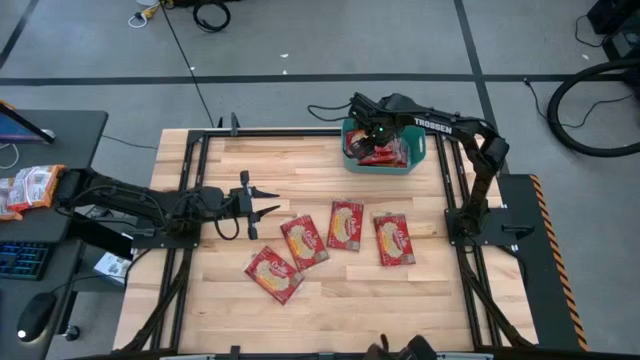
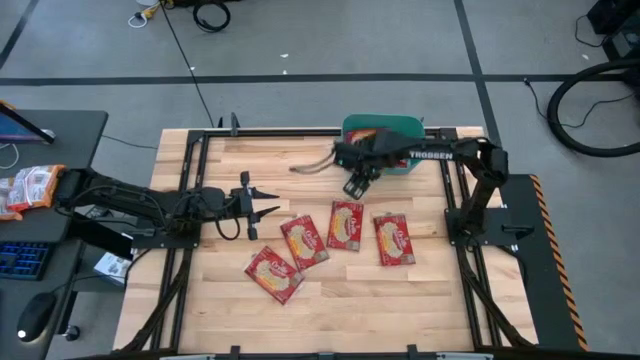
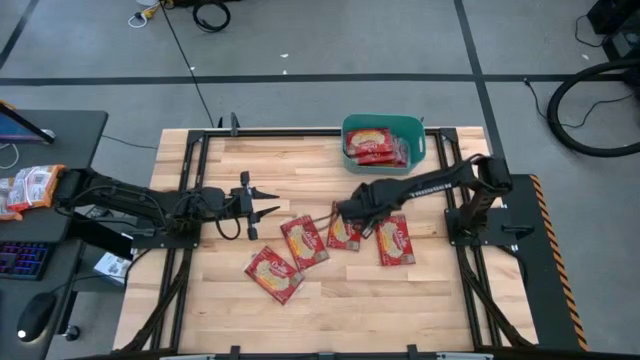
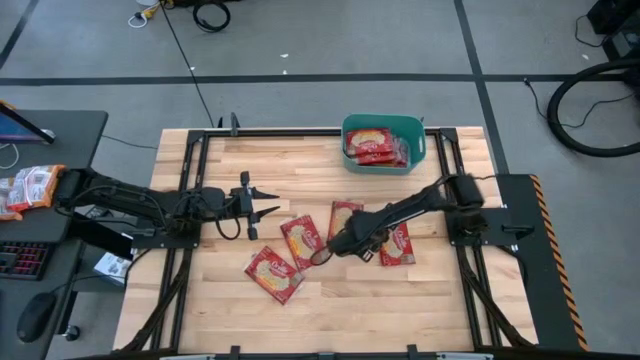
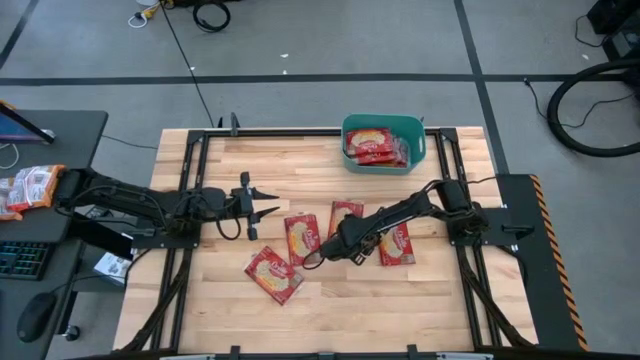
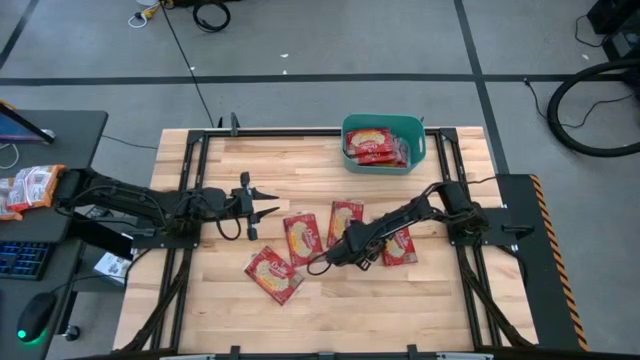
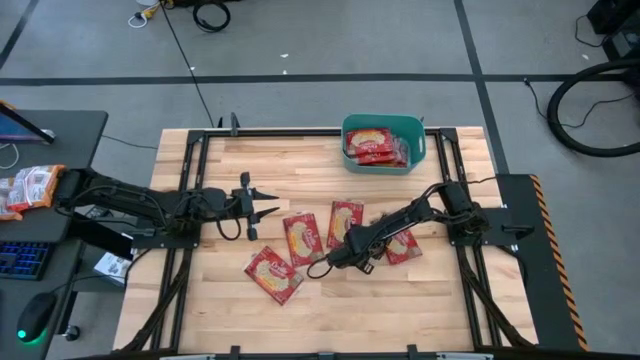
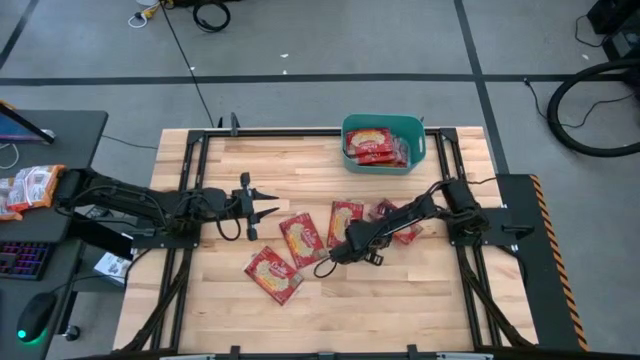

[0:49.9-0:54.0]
Task: Sort popcorn bags into baskets
Put the popcorn bag into the green bin

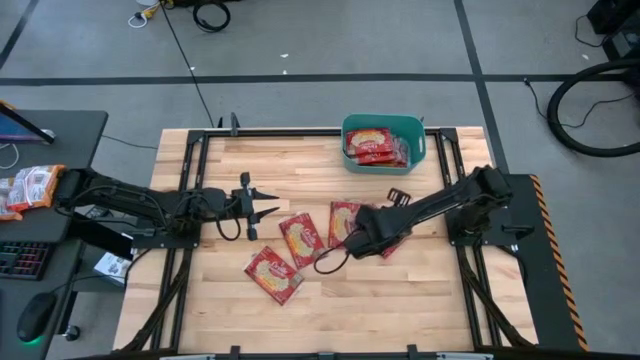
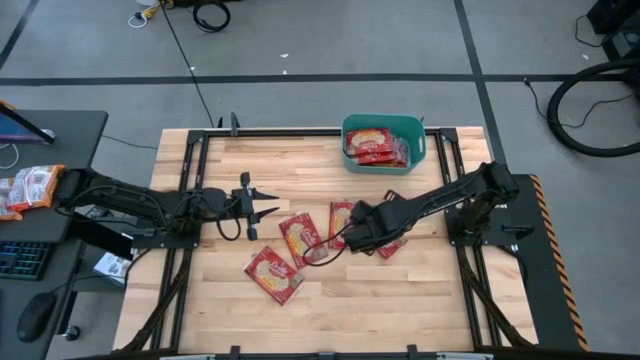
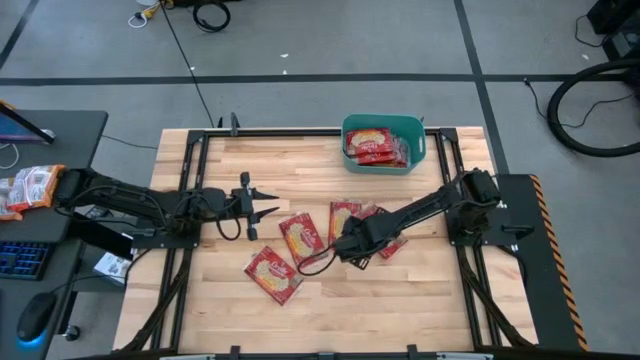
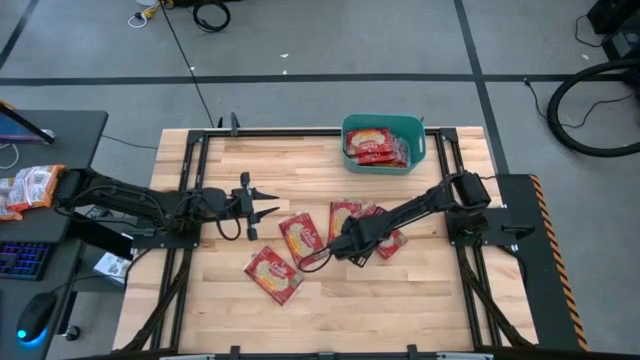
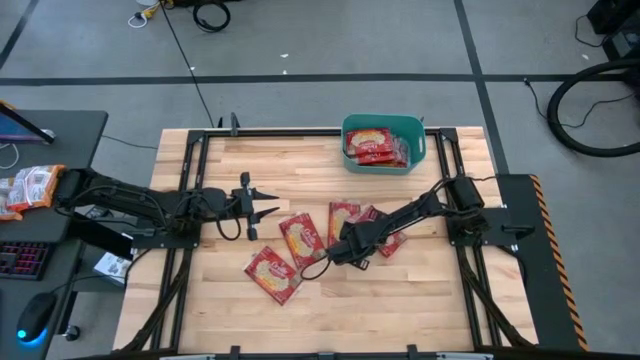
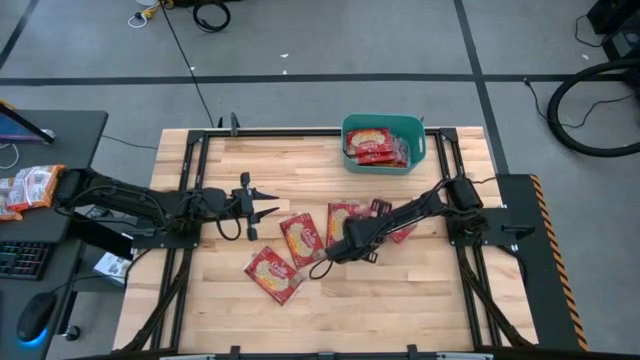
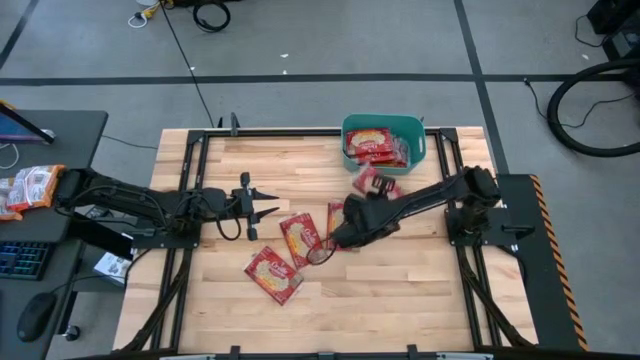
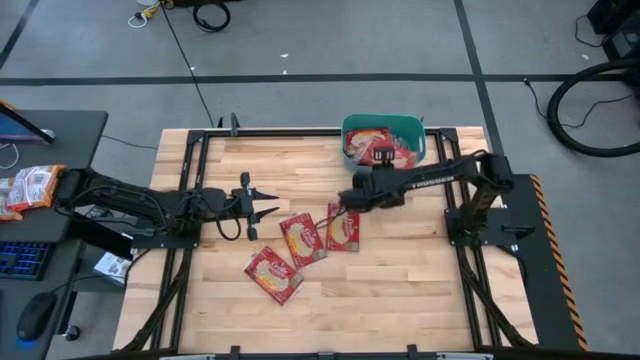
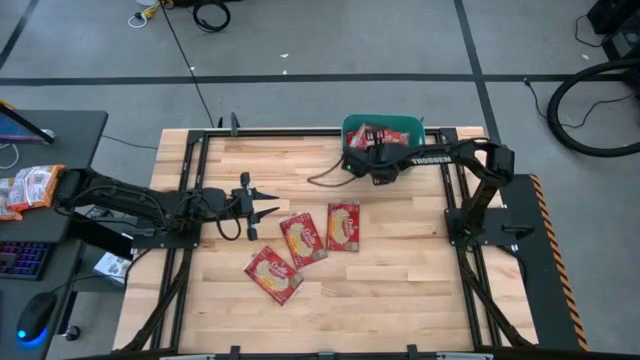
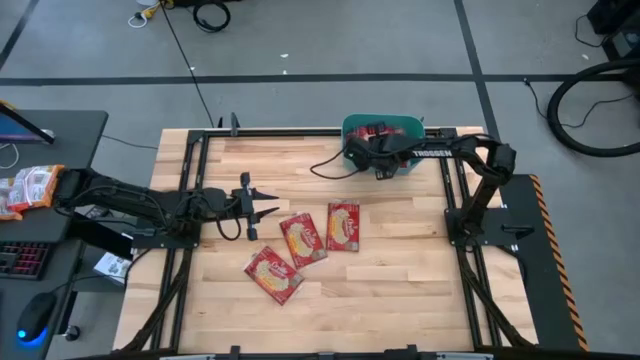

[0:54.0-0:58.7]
Put the popcorn bag into the green bin

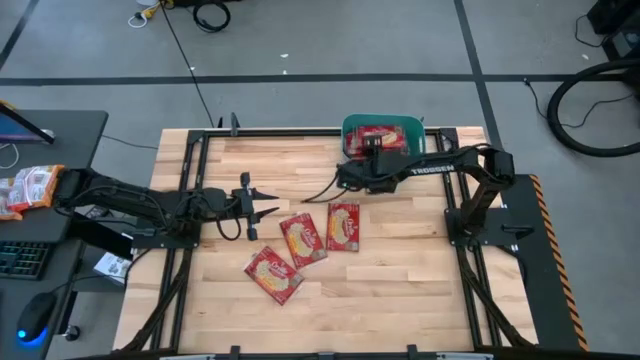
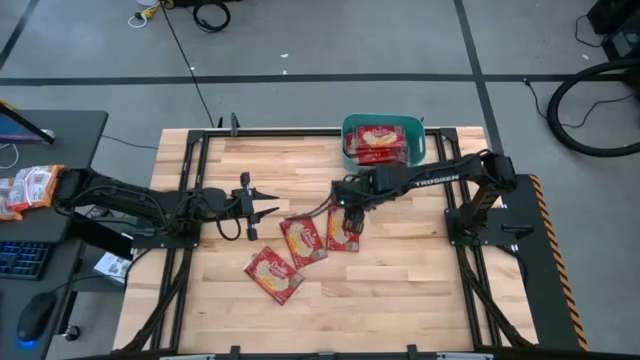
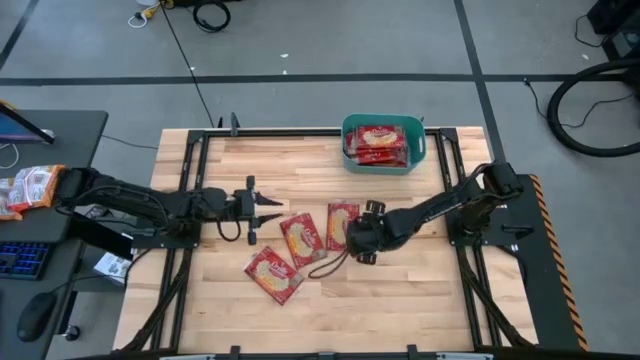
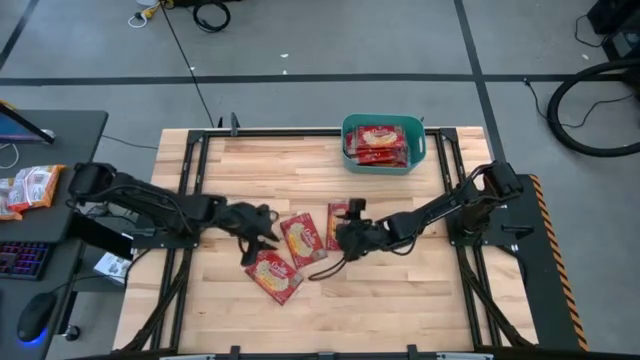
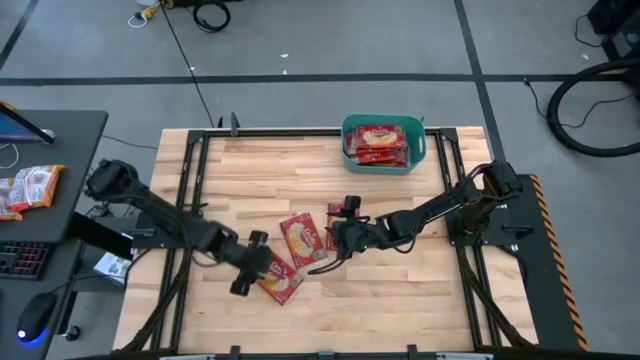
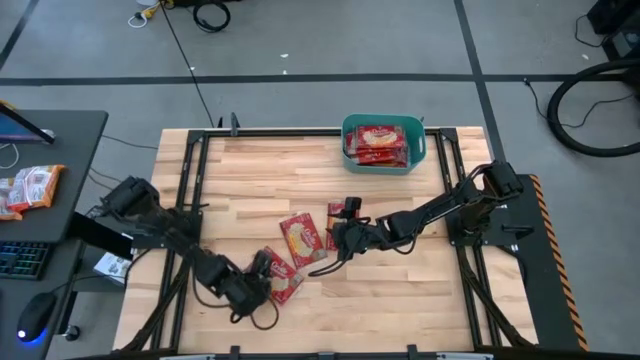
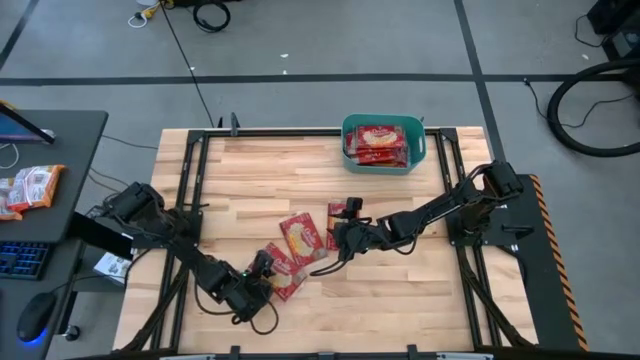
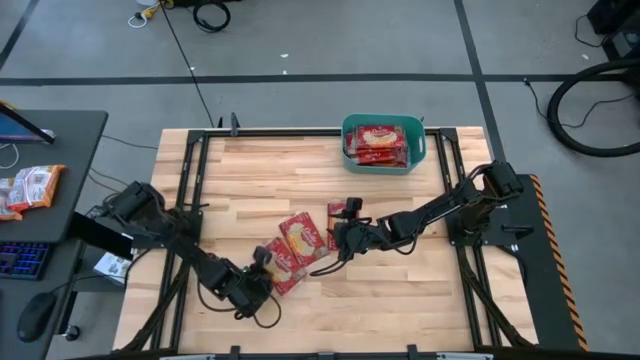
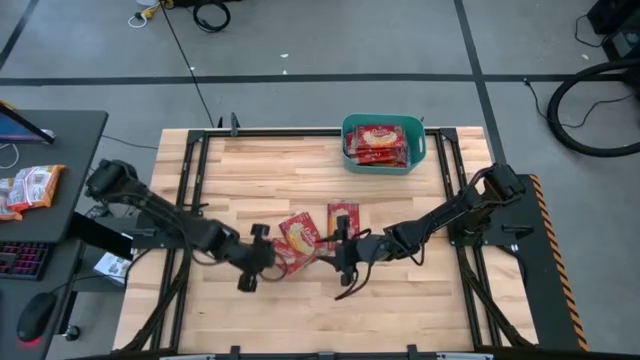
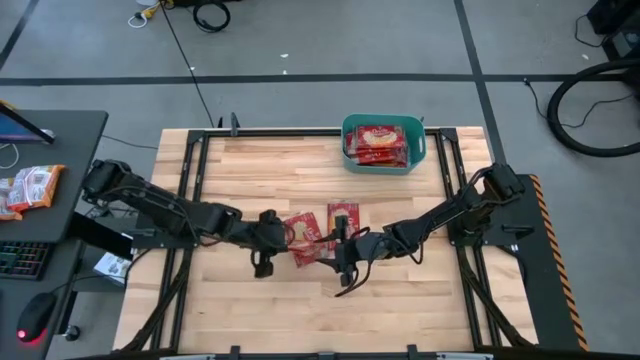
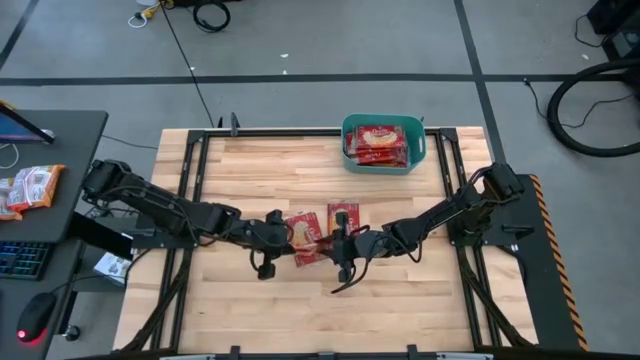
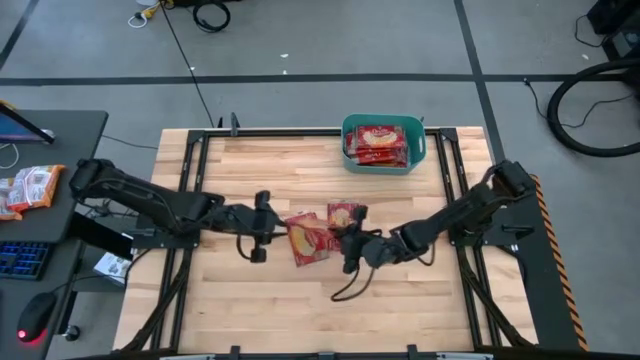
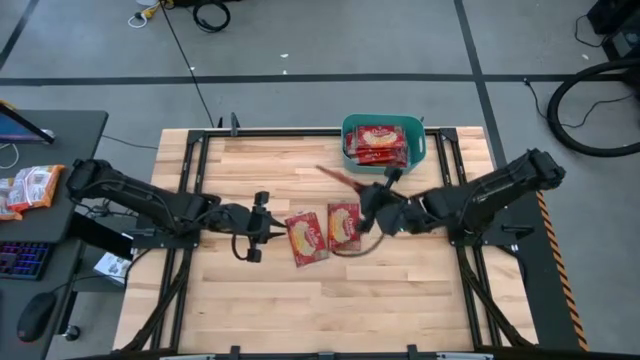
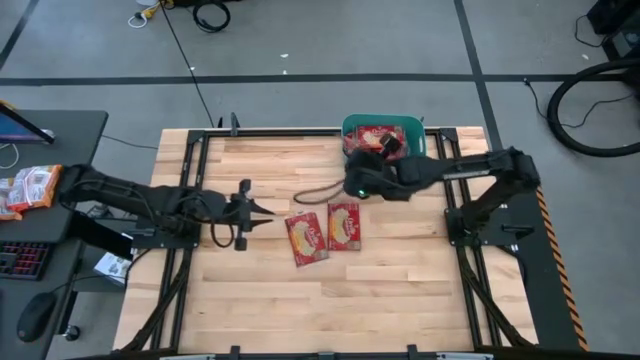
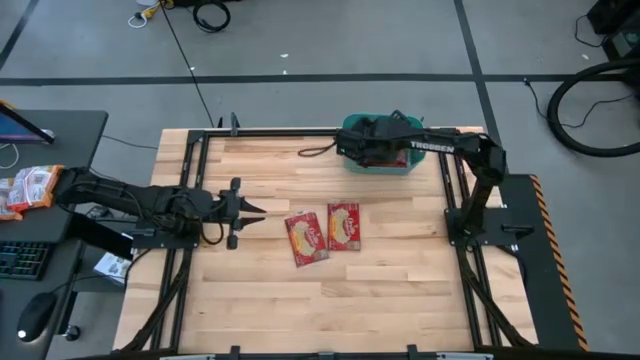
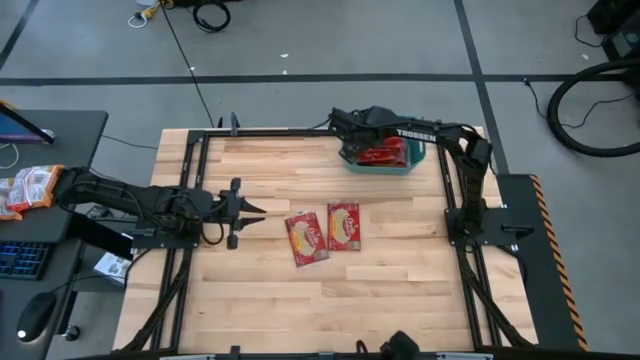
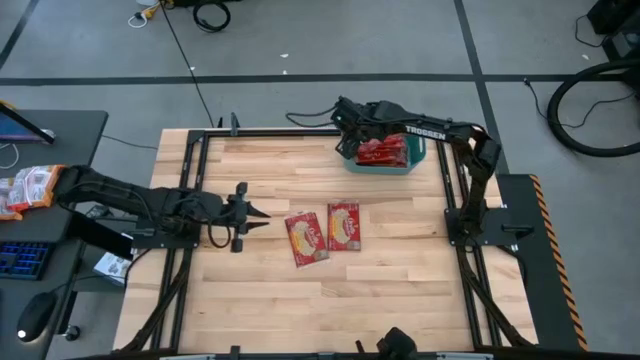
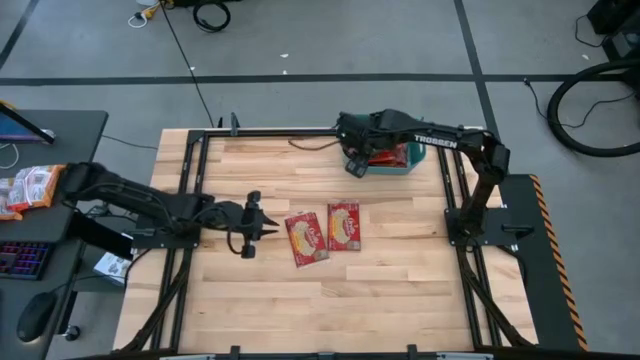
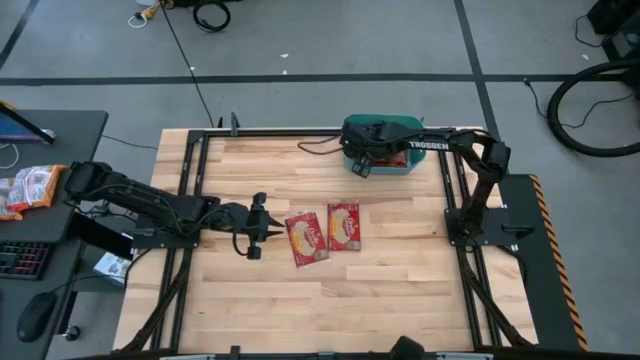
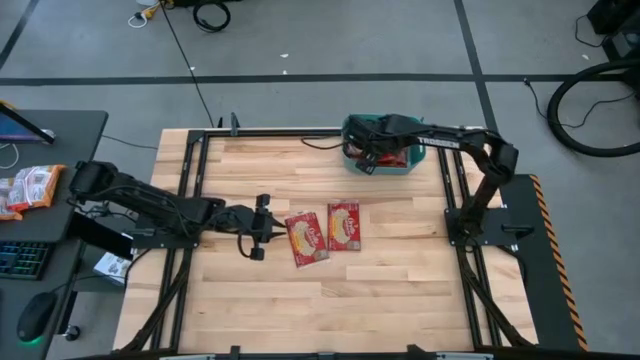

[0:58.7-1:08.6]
Put the popcorn bag into the green bin

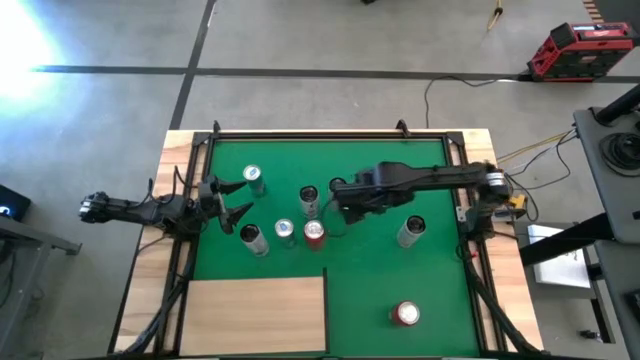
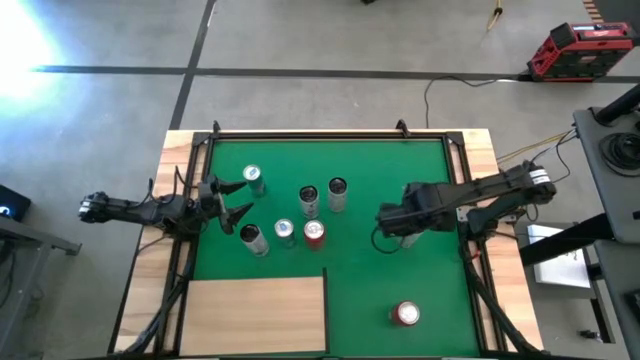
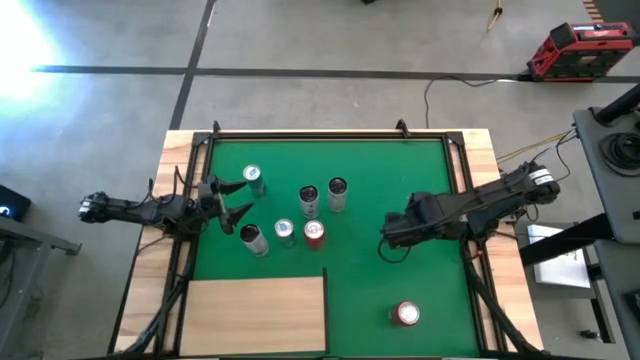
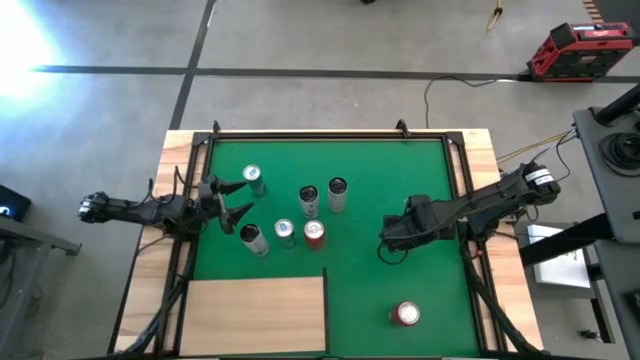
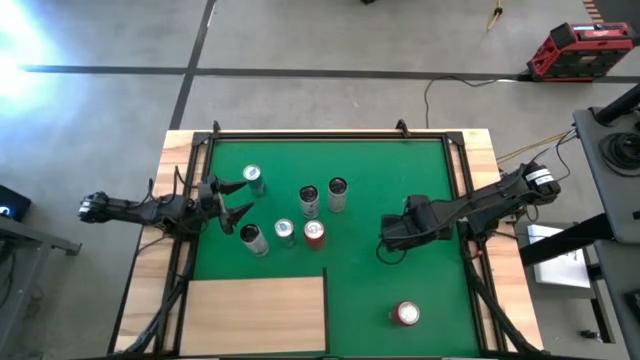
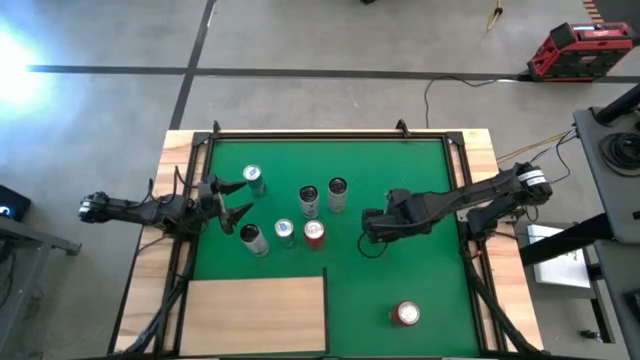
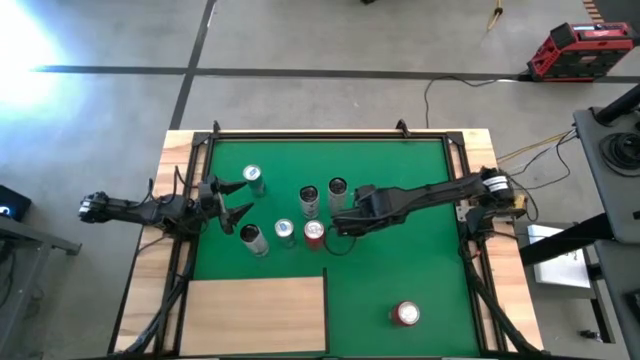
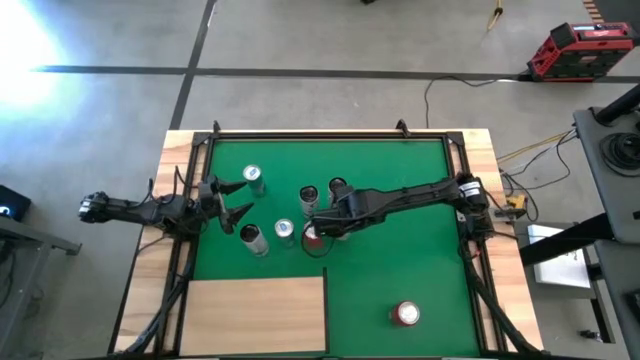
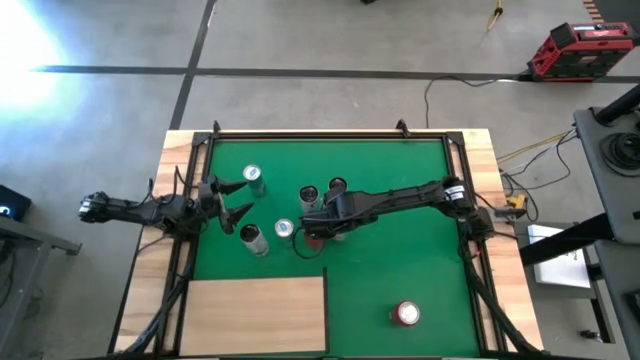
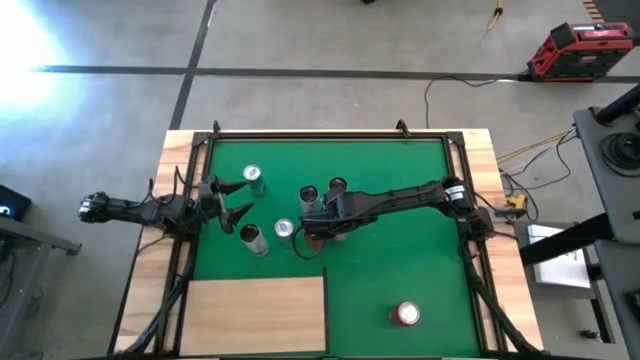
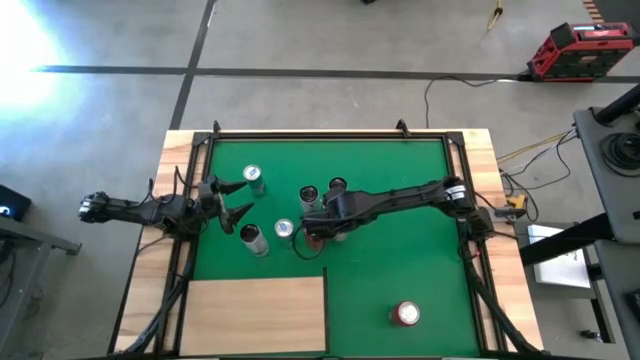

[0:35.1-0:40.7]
Task: Place canned beverage on shelf
Move the bottom white and yellow soda can to the center of the table
